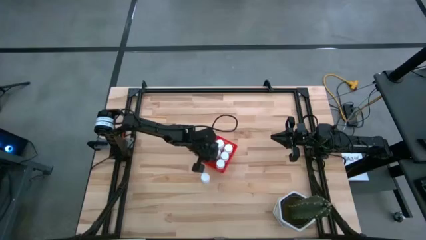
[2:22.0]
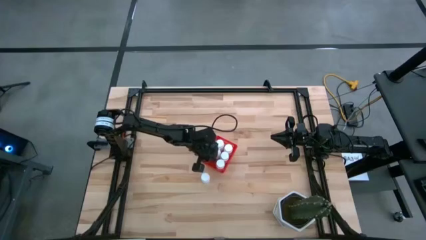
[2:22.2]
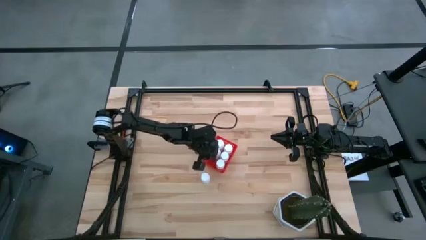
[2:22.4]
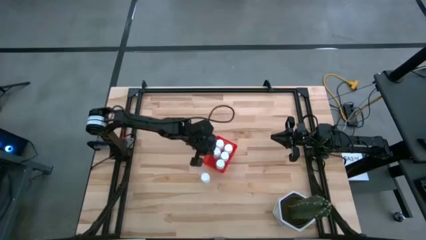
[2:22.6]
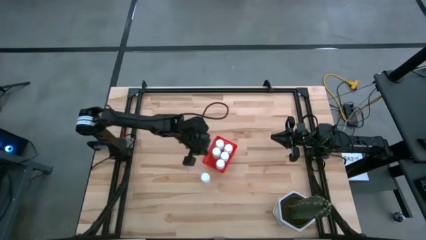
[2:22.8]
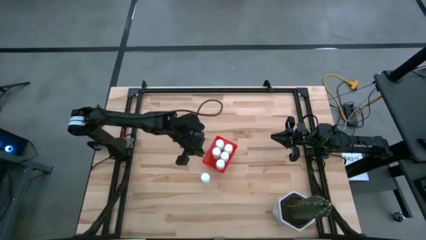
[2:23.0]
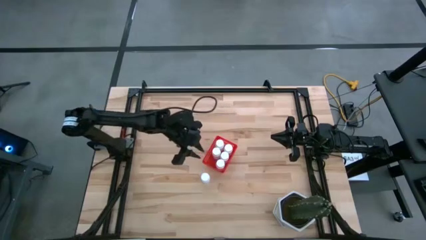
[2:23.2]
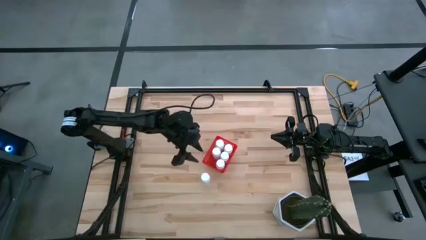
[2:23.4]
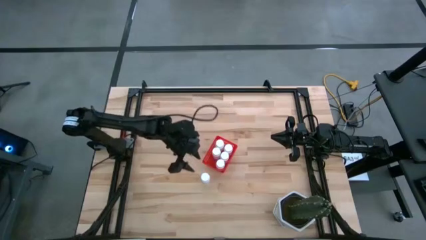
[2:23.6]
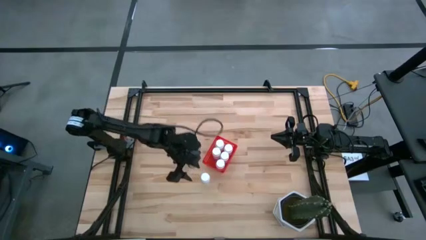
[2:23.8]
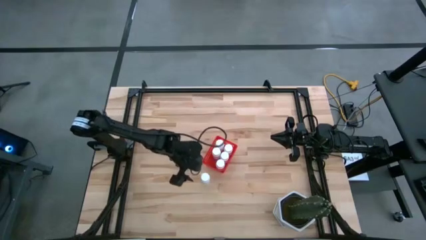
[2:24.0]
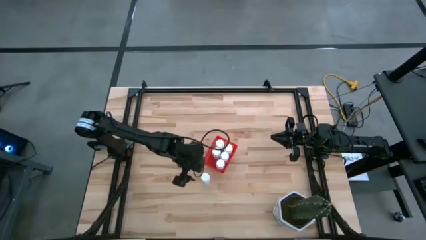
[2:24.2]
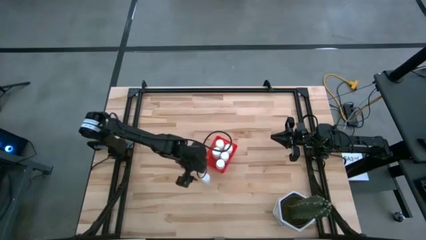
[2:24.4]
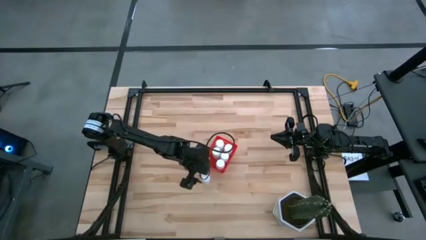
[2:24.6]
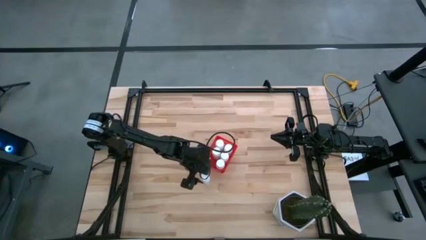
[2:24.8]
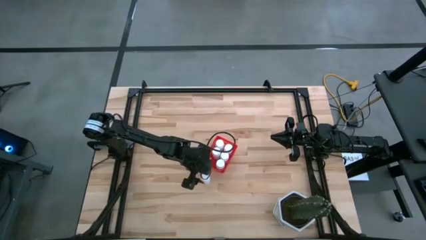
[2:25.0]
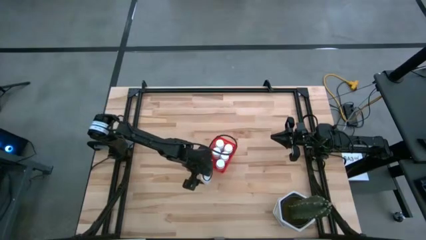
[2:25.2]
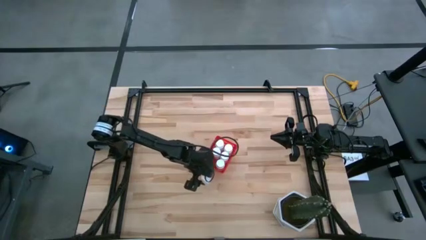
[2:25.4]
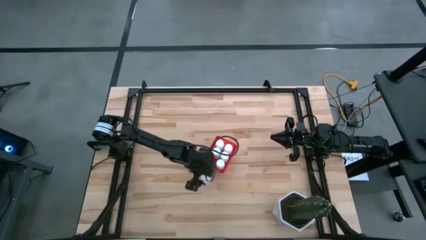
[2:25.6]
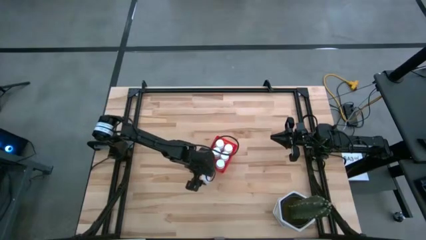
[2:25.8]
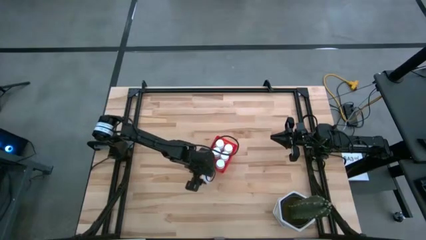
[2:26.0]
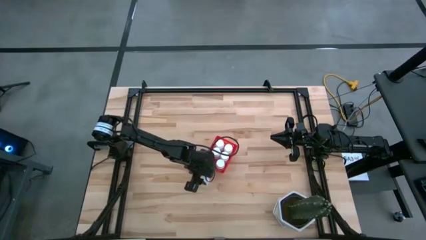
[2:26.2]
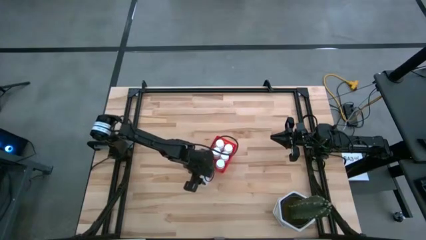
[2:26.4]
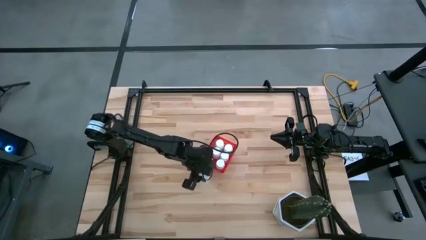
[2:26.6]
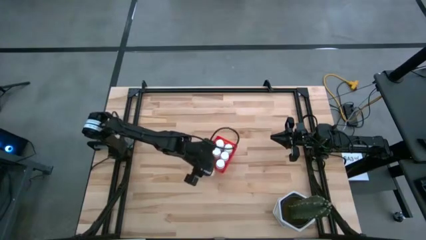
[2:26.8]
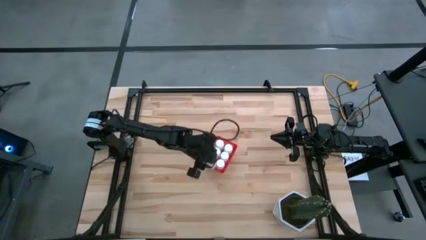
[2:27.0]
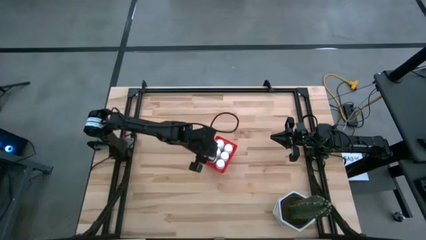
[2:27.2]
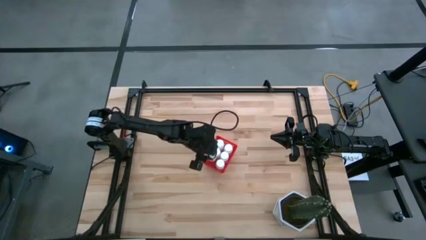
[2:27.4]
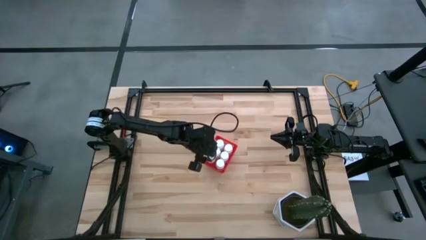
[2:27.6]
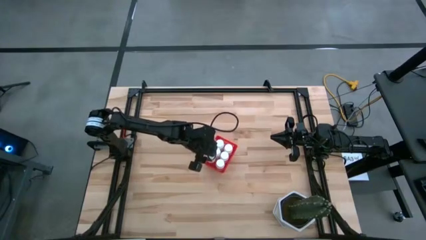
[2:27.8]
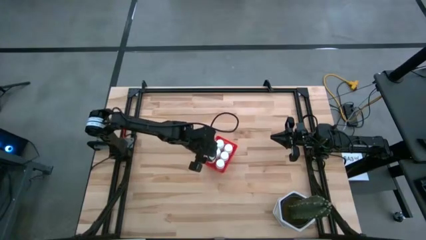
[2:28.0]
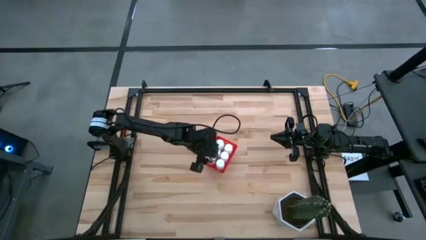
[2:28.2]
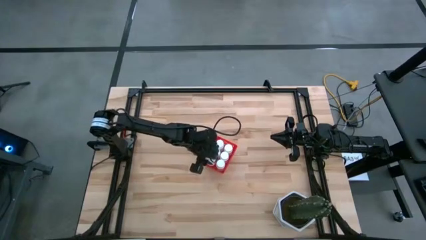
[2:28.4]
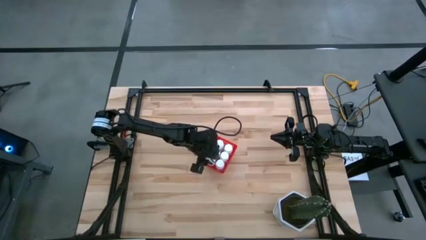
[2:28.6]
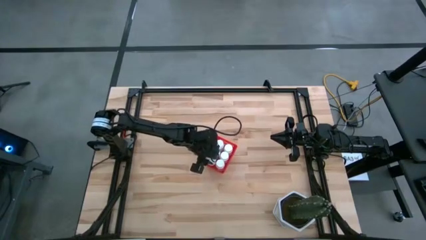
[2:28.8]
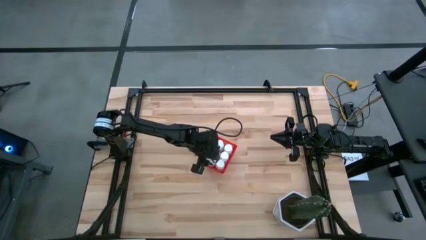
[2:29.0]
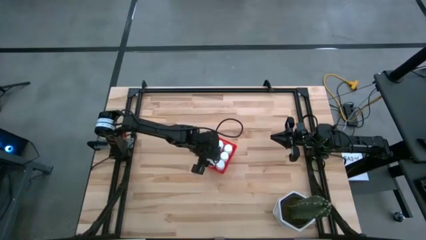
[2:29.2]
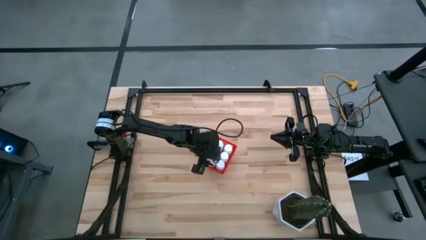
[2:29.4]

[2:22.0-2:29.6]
Task: Pick and place pill bottles into a basket
Put the white pill bottle into the red basket

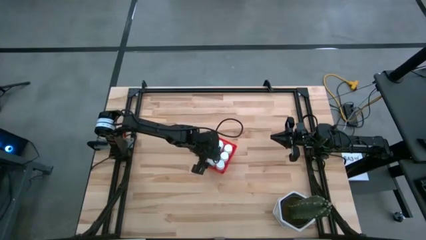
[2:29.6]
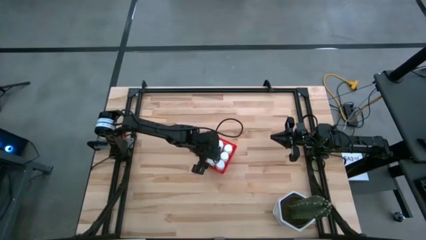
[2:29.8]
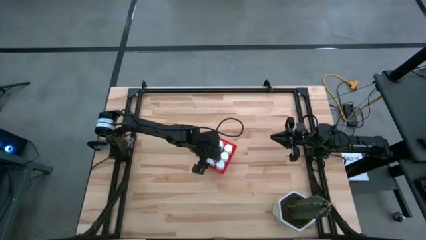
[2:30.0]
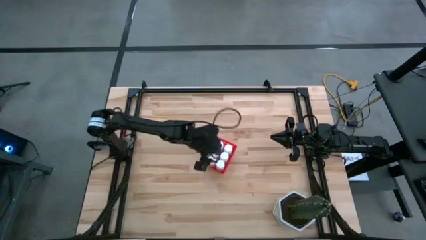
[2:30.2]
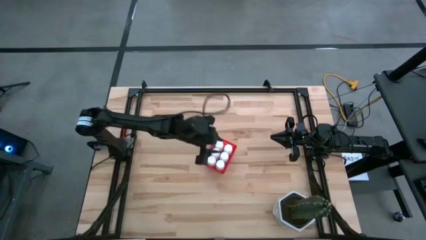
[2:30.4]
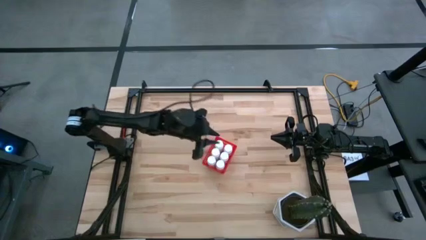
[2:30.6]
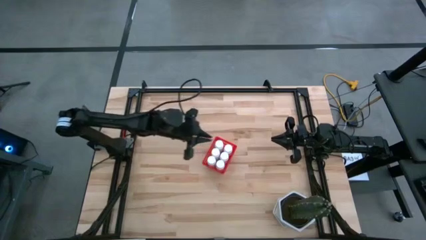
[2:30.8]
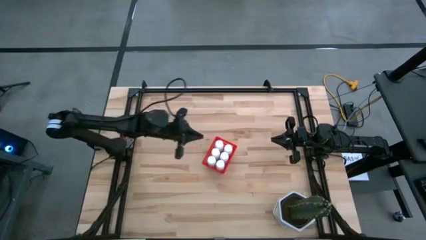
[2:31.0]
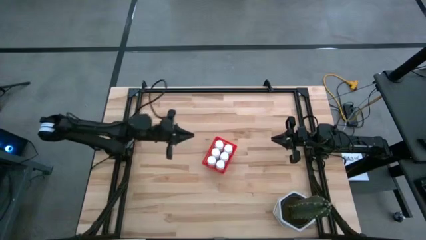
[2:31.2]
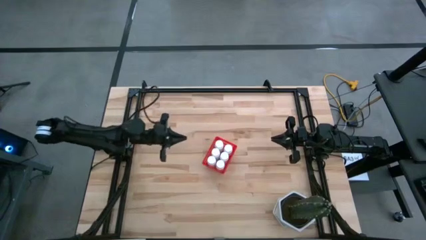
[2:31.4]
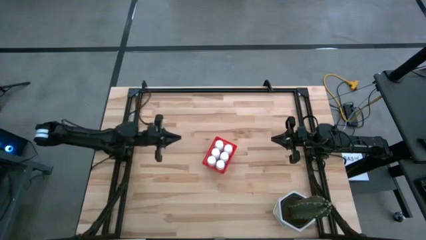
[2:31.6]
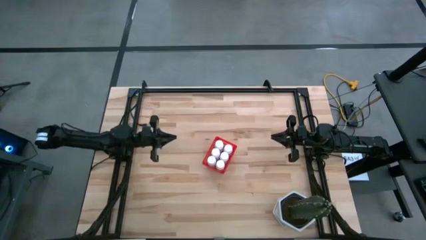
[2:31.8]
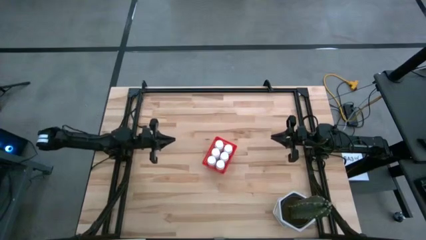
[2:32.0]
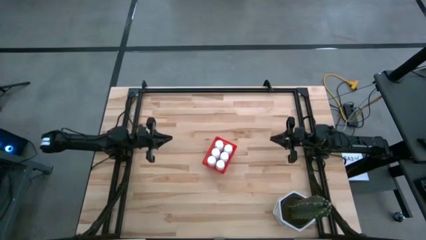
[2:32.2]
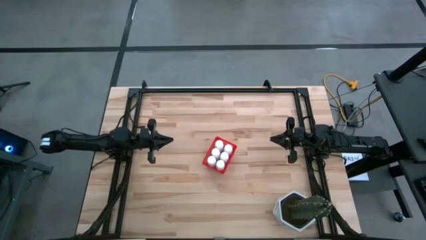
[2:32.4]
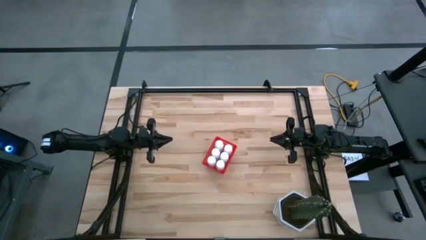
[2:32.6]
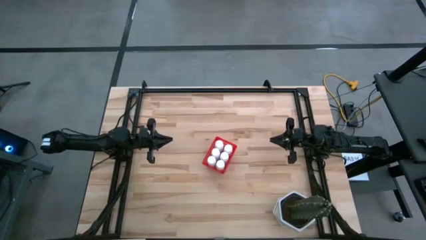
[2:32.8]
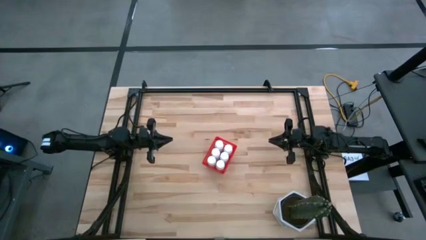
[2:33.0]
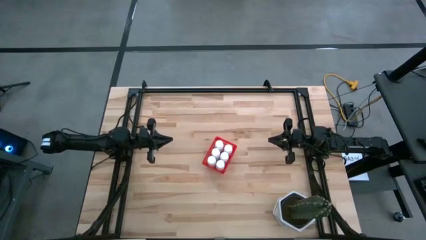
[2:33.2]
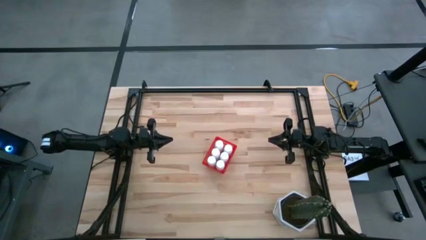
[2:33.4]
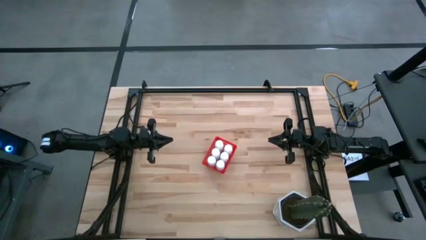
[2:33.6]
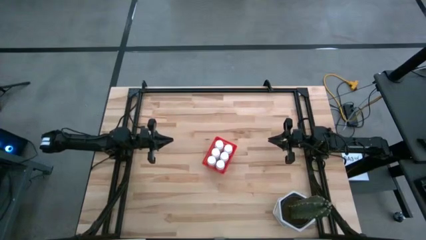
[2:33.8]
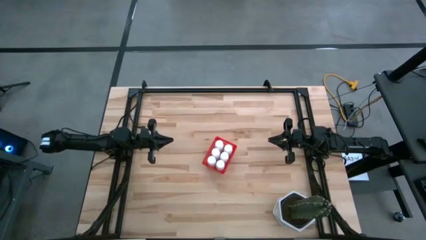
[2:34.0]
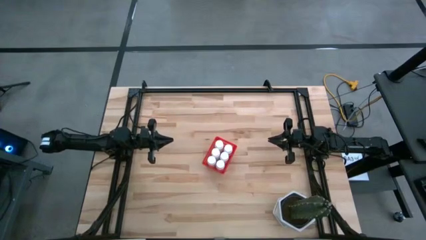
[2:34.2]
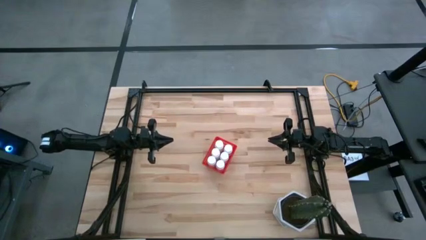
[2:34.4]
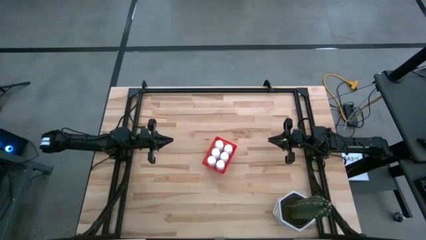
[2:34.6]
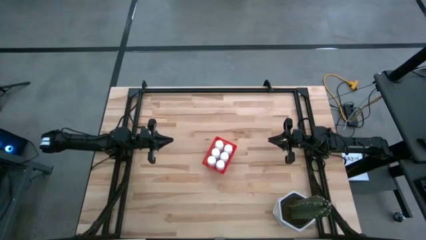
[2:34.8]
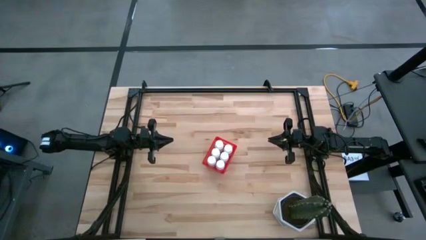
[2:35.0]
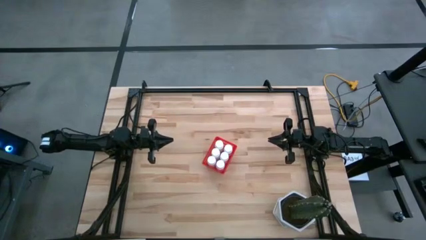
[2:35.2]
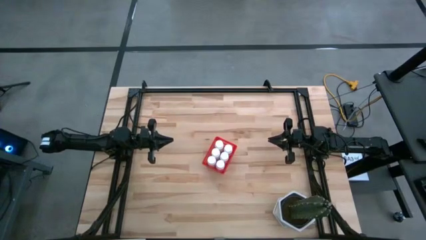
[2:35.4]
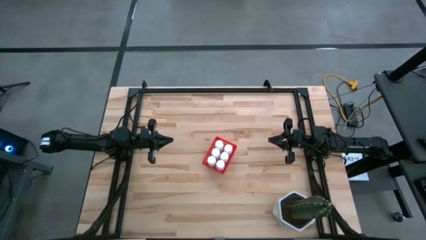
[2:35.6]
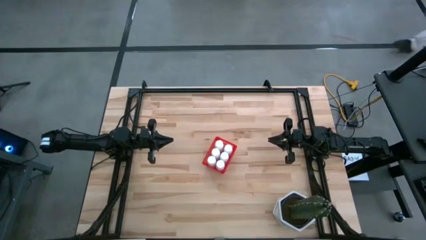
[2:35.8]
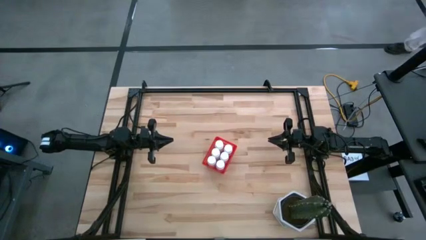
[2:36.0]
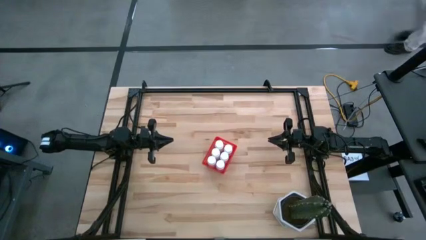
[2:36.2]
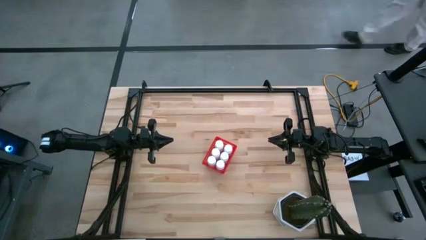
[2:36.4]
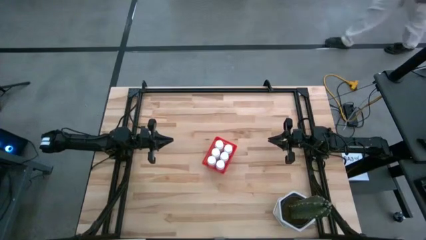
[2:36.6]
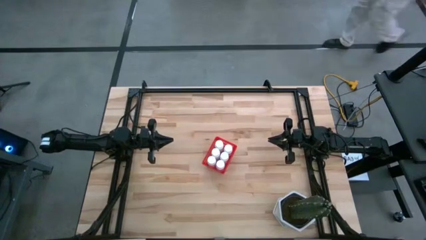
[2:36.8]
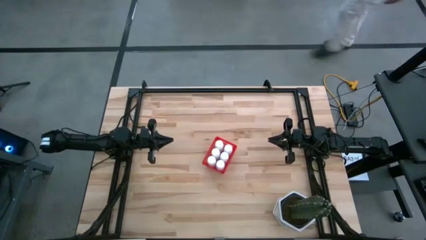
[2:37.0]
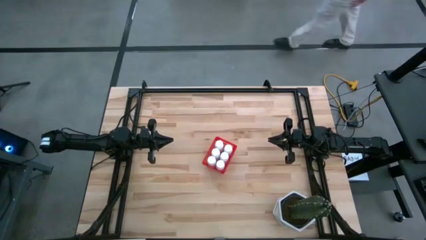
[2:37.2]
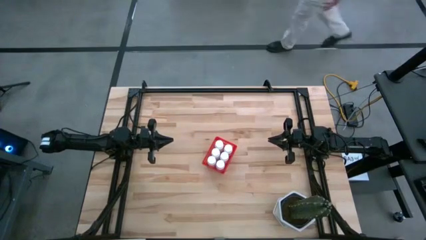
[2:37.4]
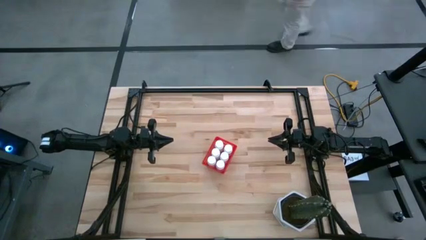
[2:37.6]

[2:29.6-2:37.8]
Return to Home Position
